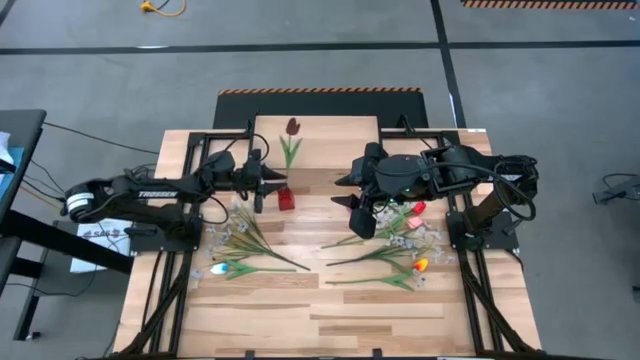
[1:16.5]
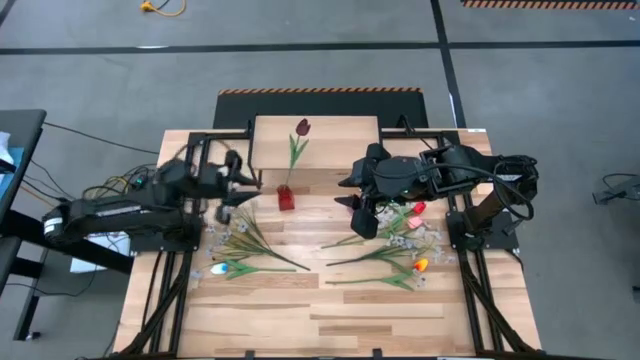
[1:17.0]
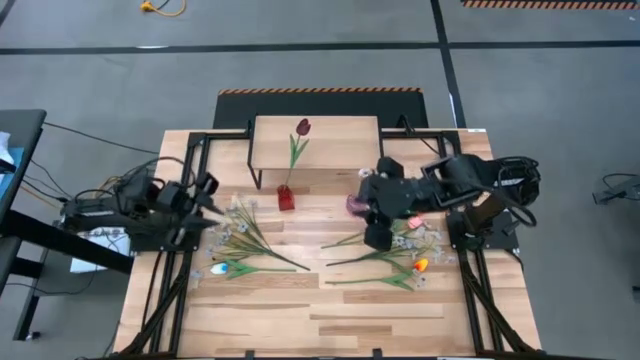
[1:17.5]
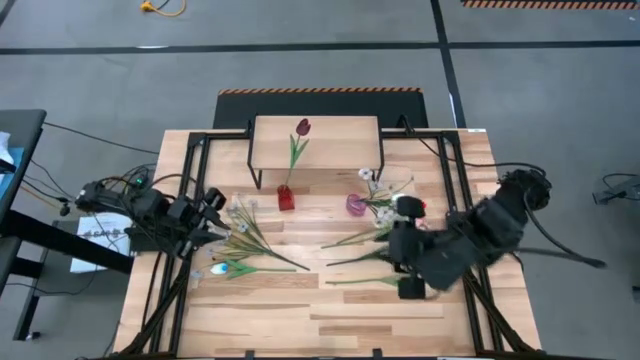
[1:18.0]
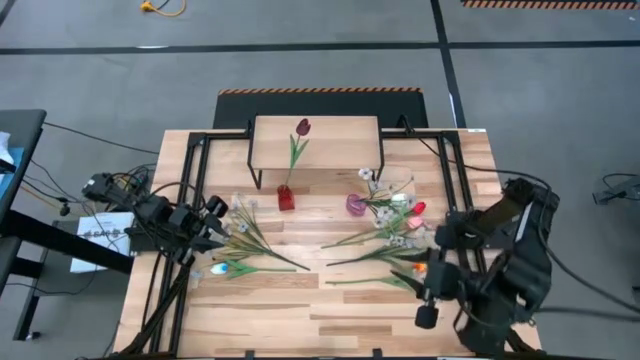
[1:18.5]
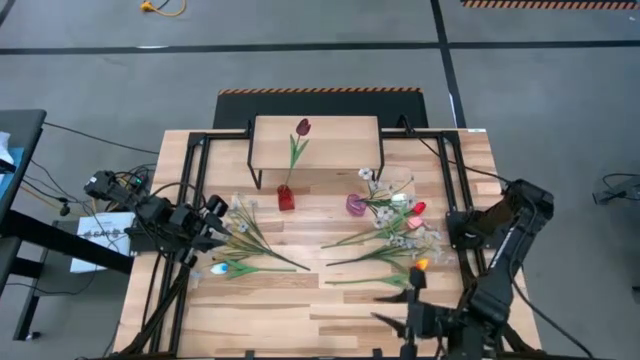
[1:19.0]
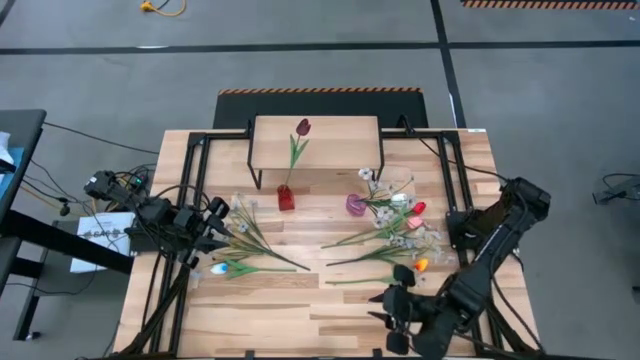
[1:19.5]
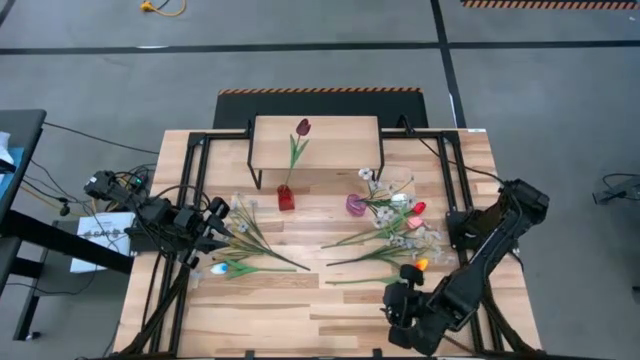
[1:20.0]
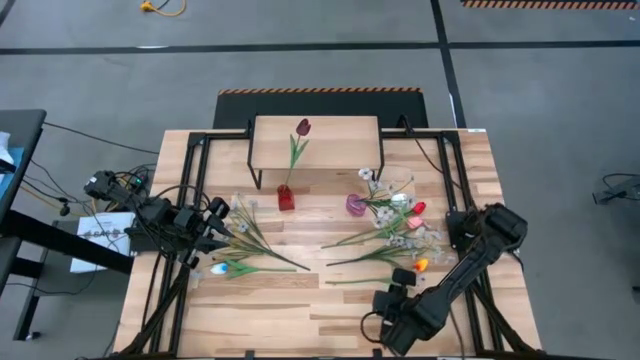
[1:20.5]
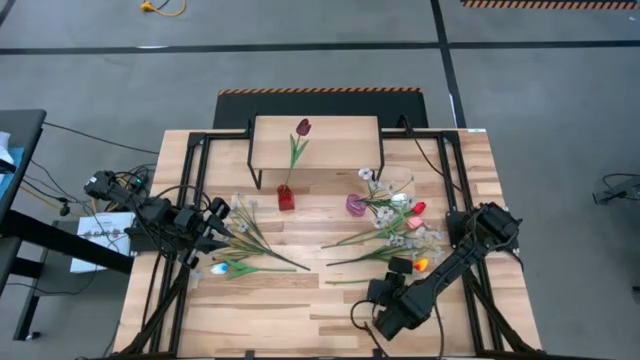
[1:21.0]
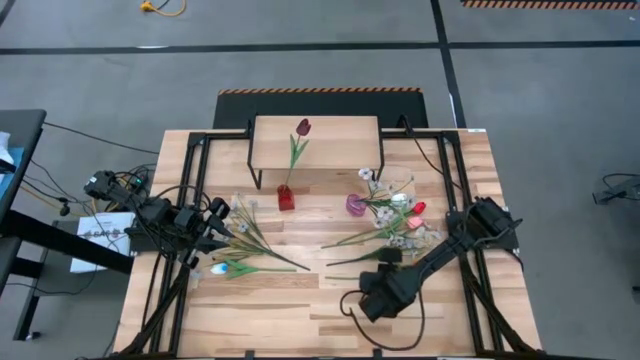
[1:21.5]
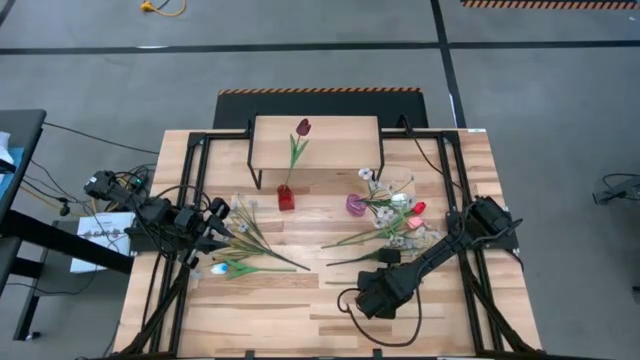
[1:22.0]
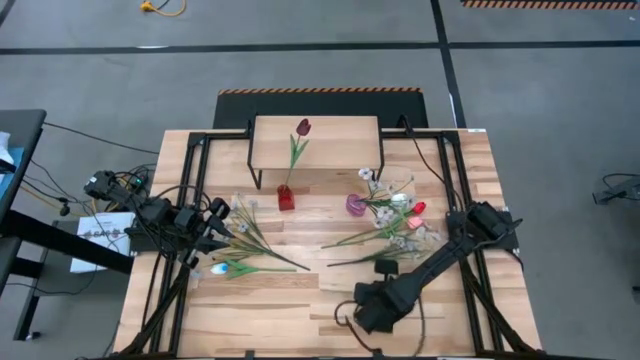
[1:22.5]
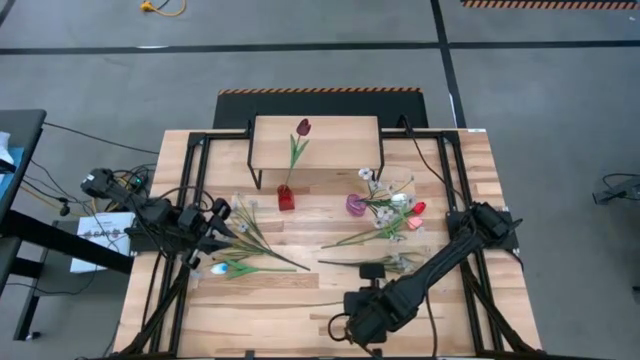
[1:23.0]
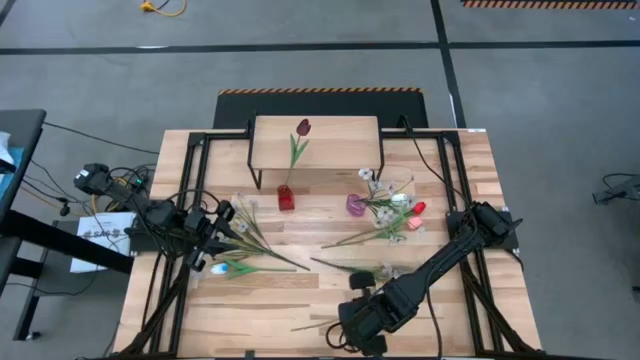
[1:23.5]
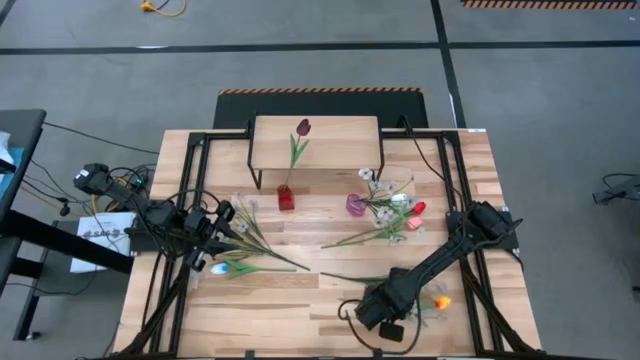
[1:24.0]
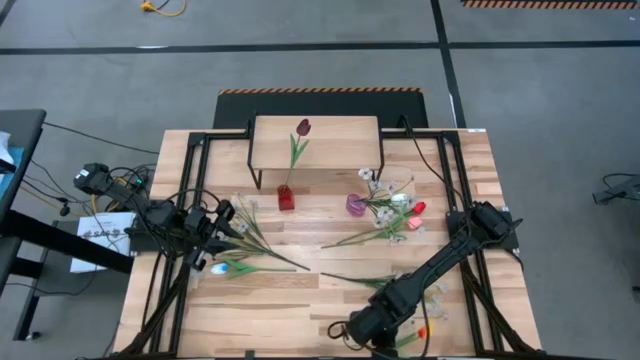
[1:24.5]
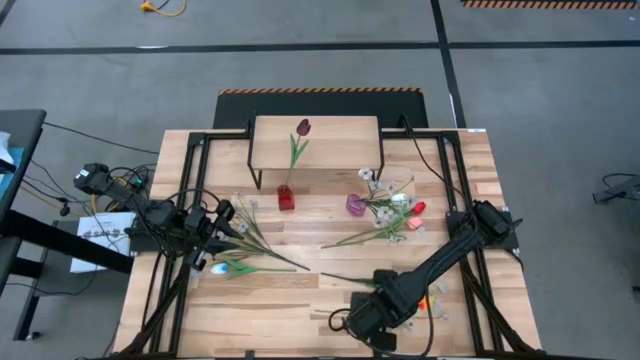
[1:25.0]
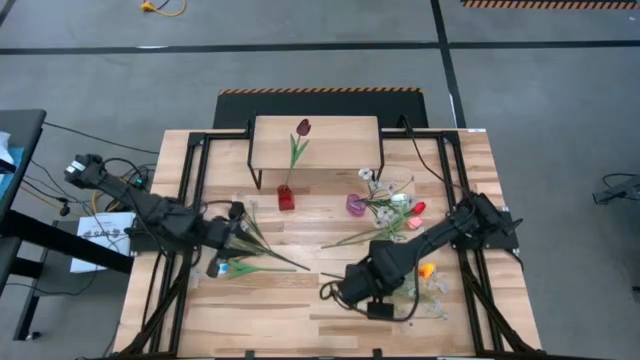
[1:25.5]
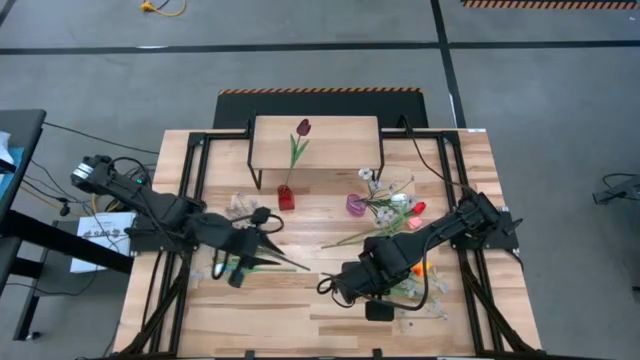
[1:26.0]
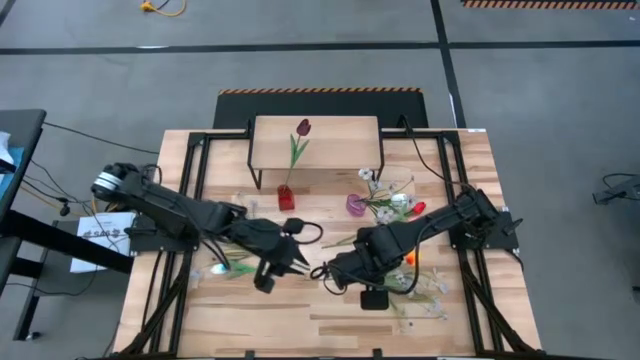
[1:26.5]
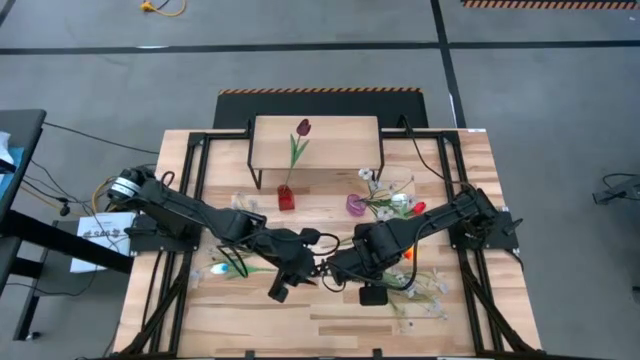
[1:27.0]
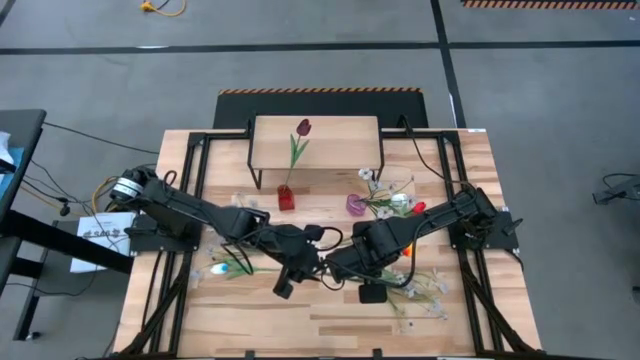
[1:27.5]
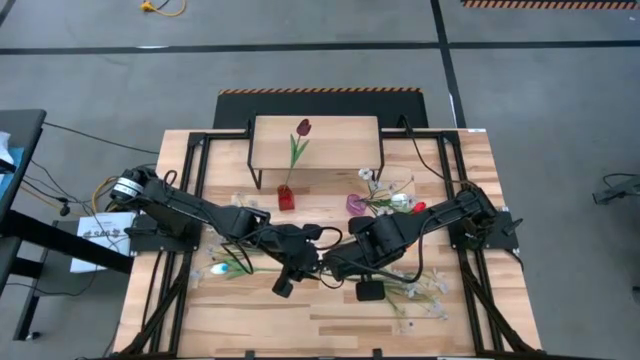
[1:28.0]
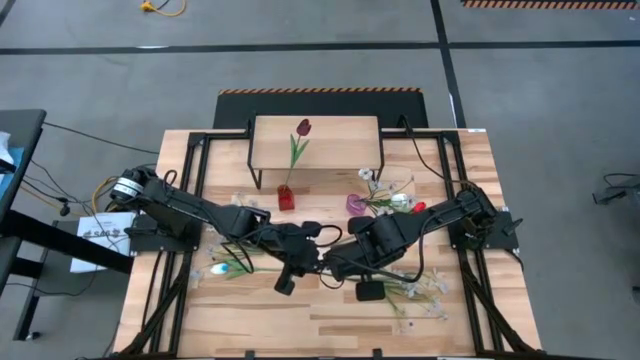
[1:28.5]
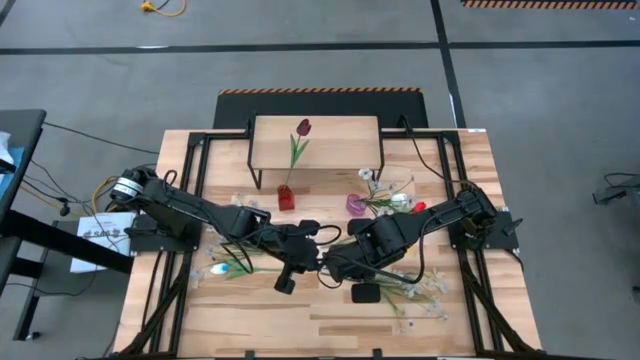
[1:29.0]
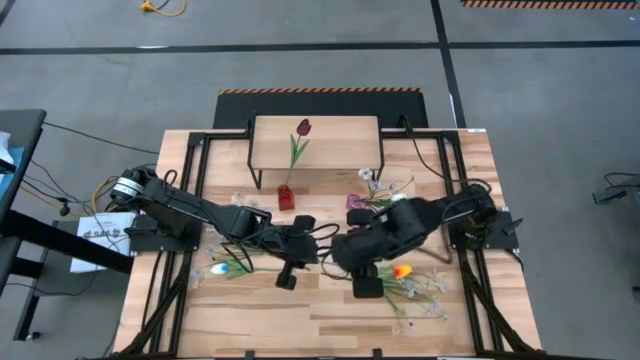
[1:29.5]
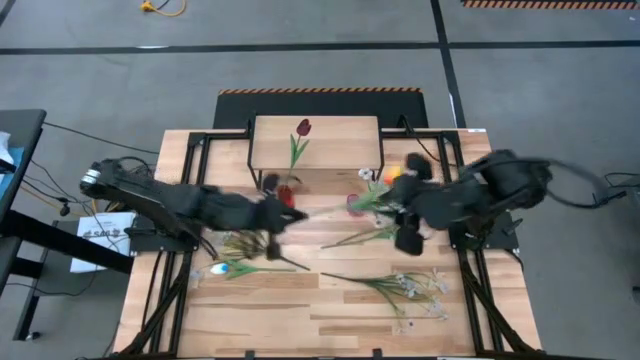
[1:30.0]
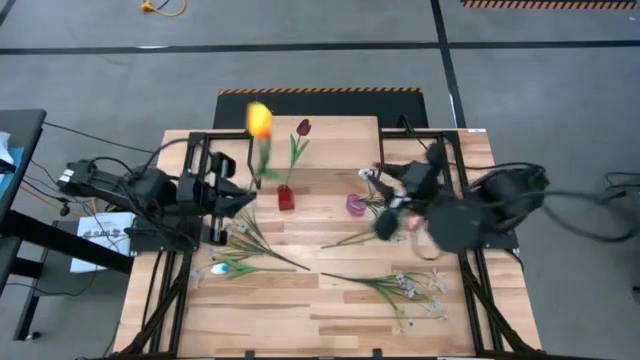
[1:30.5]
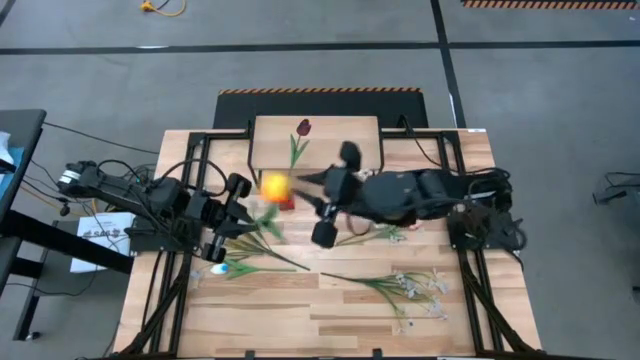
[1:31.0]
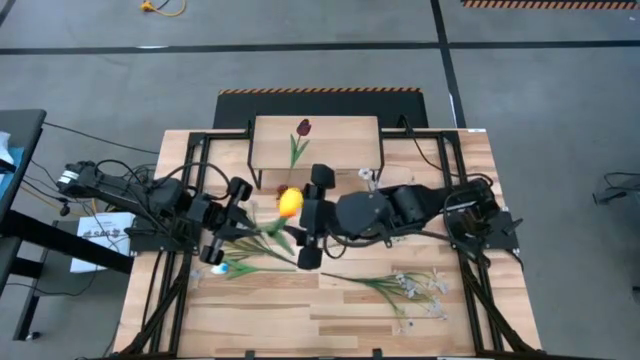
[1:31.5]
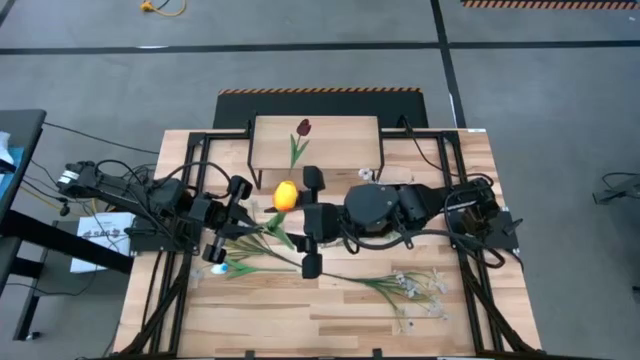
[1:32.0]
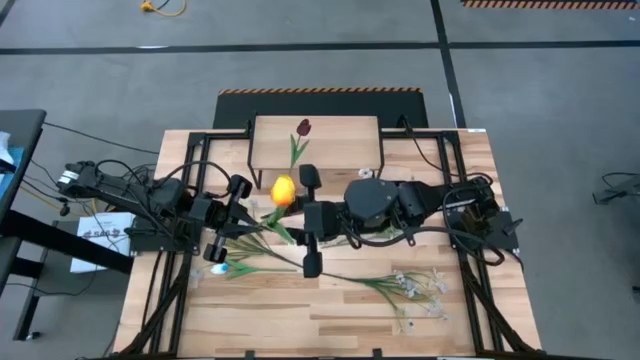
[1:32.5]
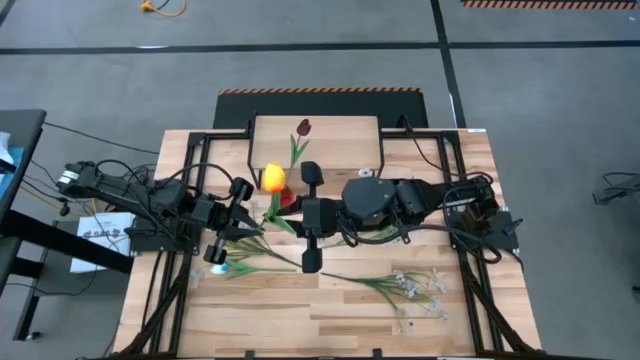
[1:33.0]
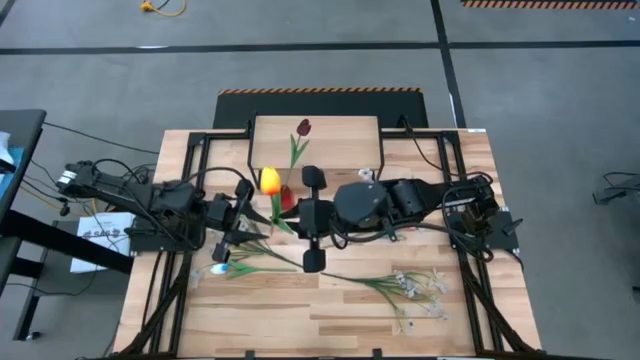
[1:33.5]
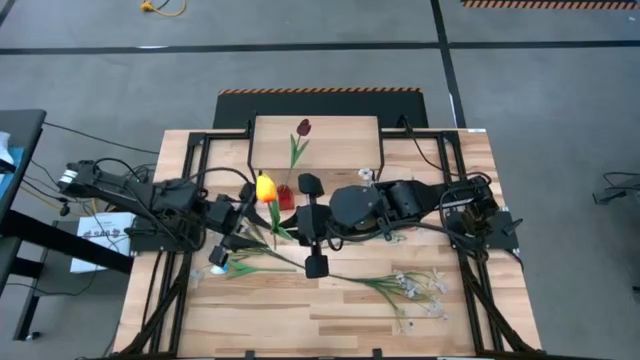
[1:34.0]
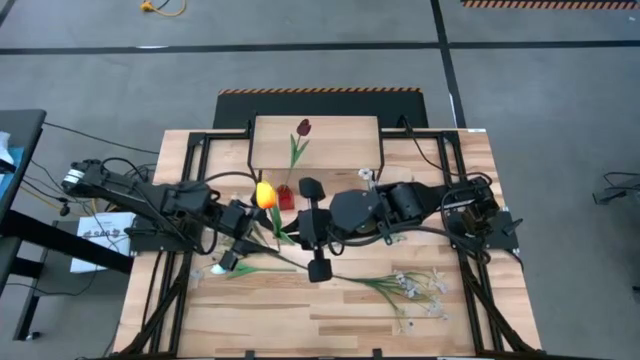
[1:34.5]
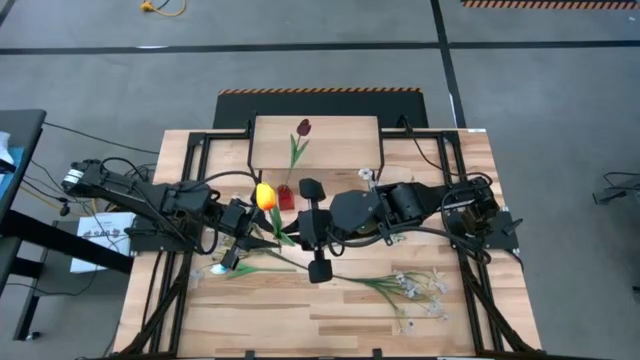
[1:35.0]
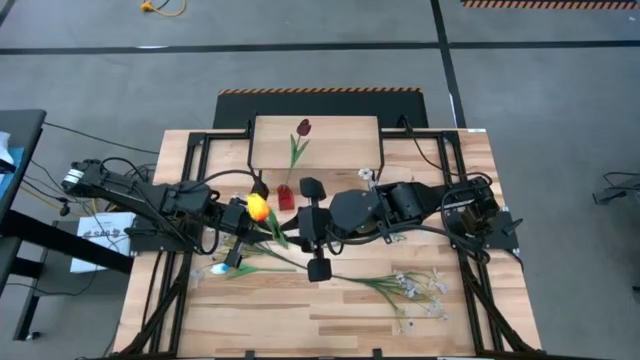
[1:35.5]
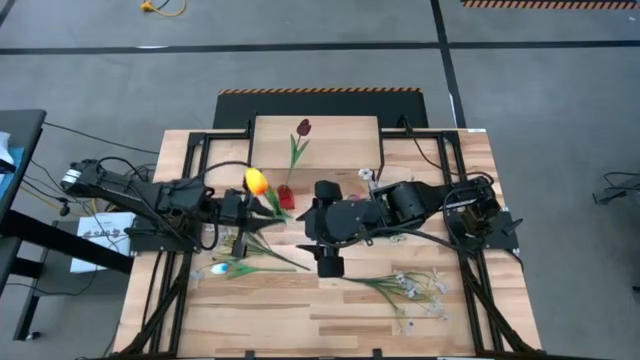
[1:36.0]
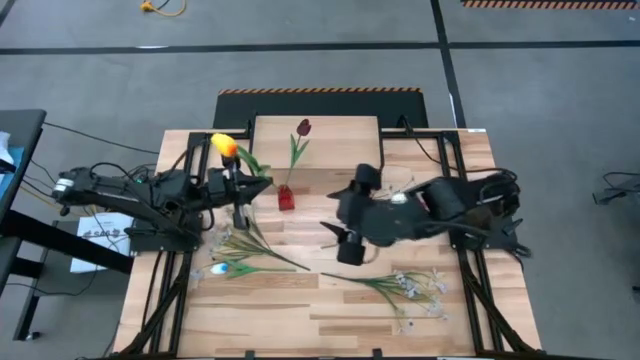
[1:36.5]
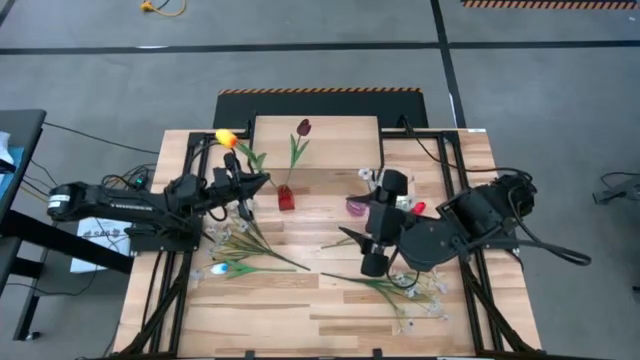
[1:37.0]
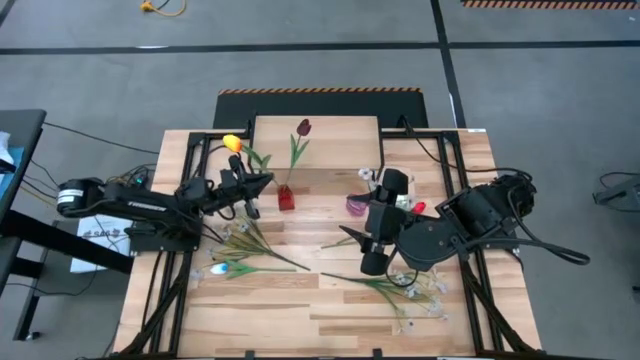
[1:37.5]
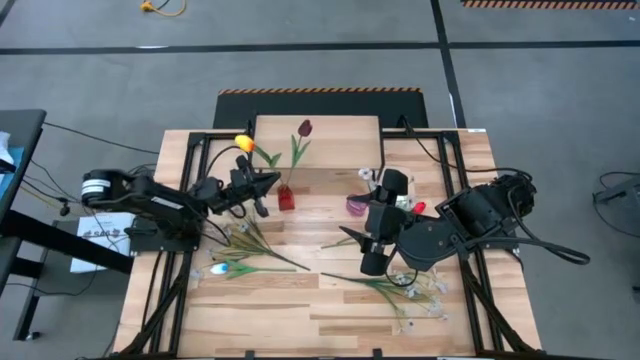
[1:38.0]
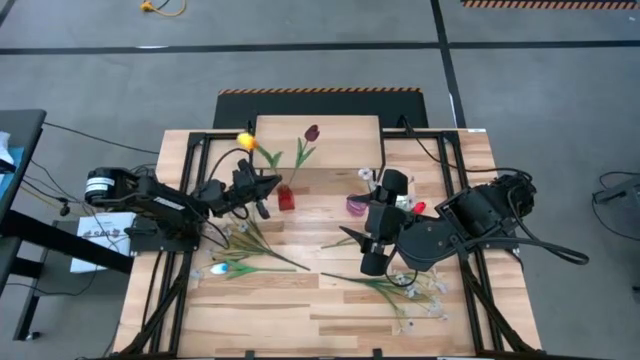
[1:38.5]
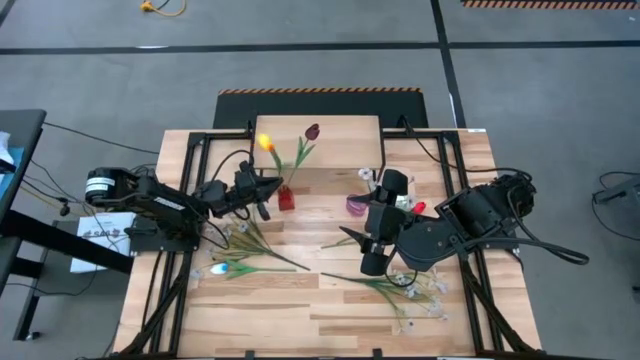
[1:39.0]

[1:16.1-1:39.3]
Task: Pick and place flowers into a vace then onto a shelf
Put the yellow tulip into the red vase
